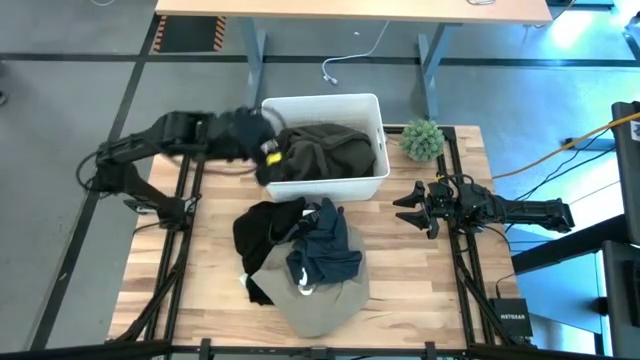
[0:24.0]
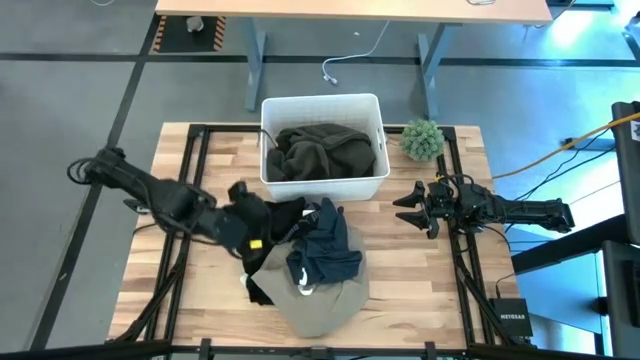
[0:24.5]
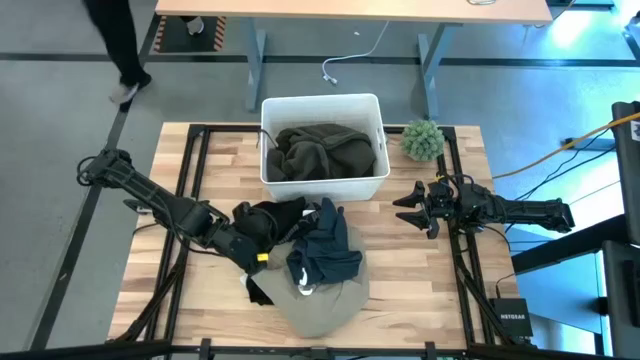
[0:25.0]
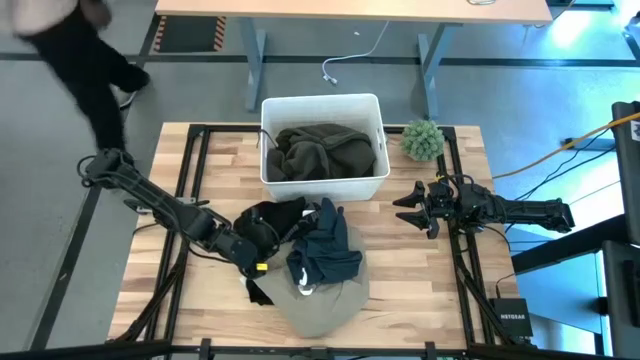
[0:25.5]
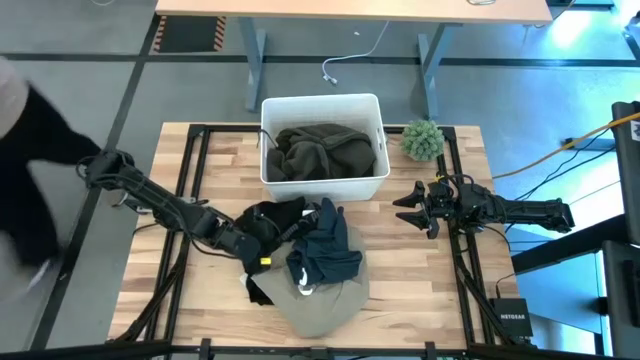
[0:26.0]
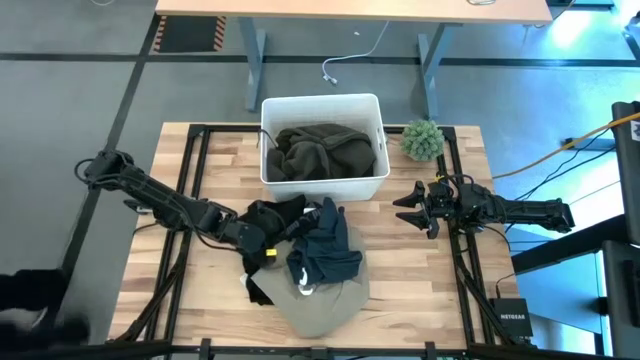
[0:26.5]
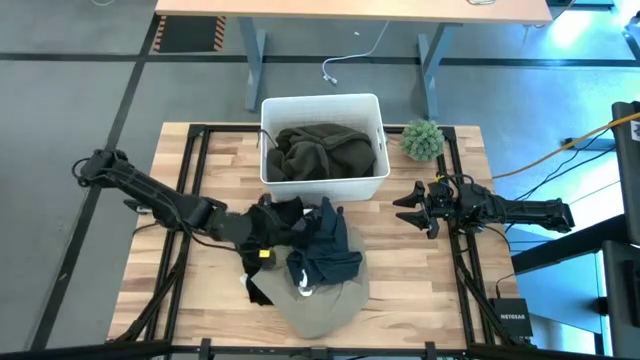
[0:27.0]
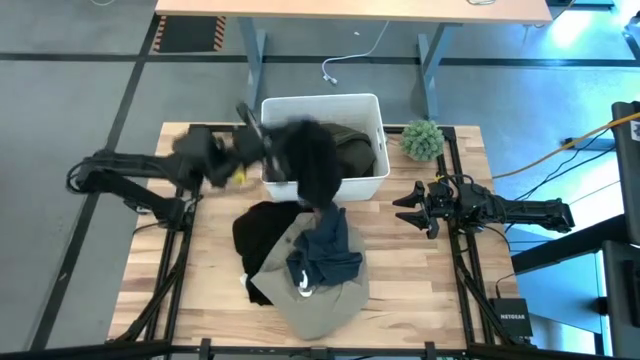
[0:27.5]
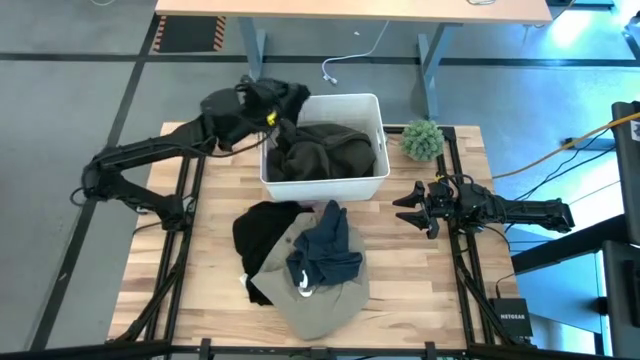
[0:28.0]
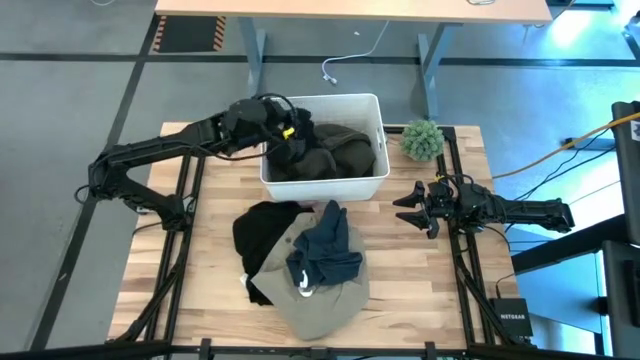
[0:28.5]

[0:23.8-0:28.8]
Task: Sort clothes
Put the black boxers into the white bin

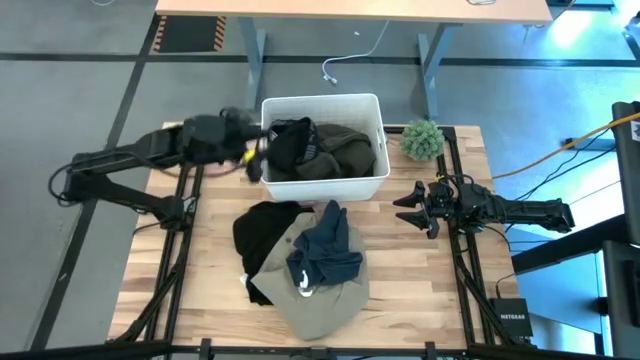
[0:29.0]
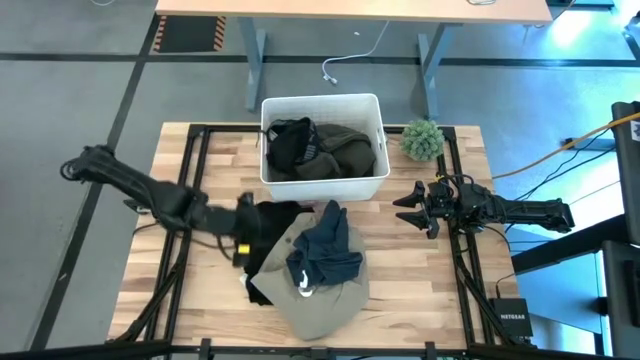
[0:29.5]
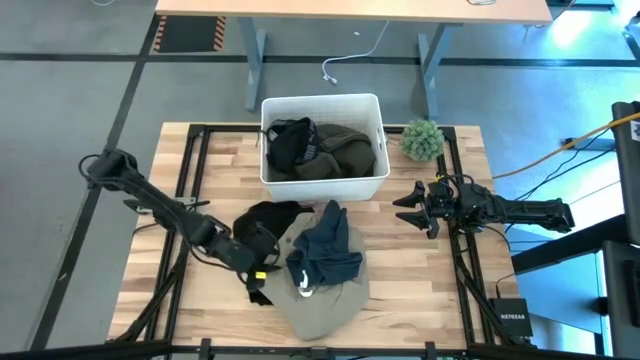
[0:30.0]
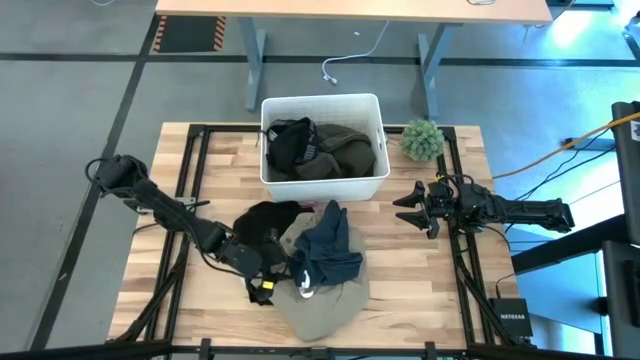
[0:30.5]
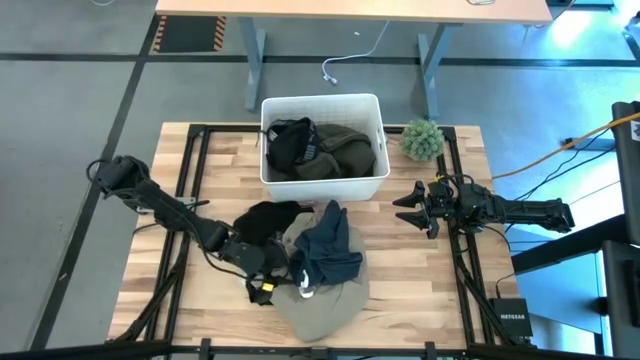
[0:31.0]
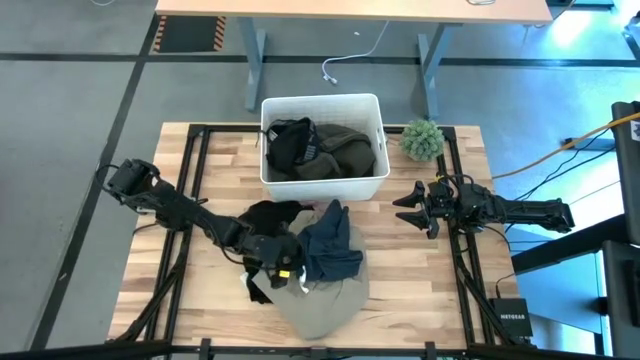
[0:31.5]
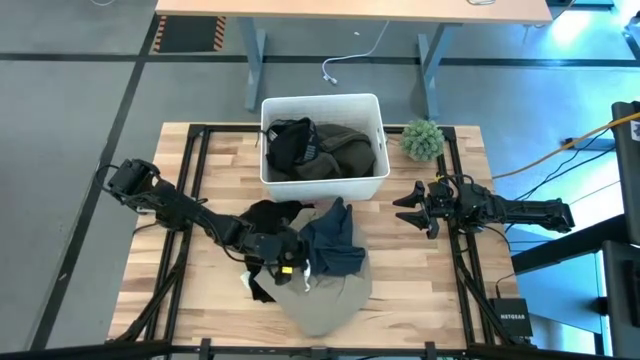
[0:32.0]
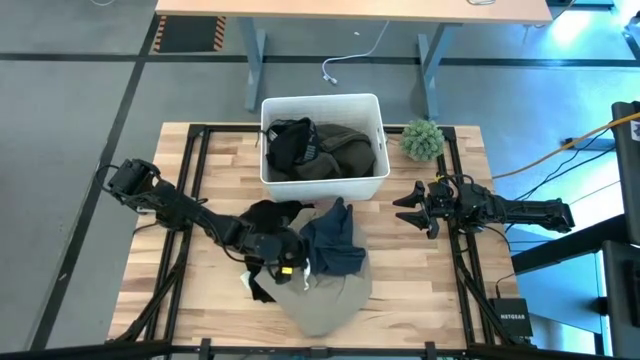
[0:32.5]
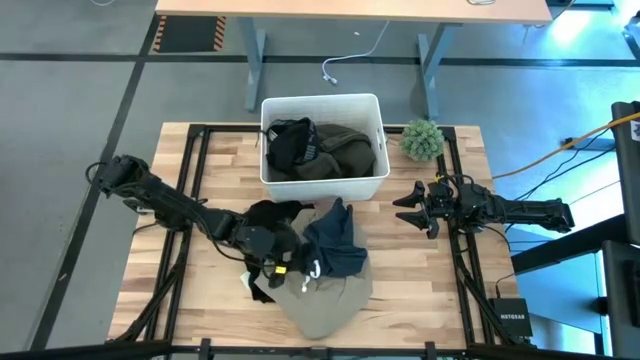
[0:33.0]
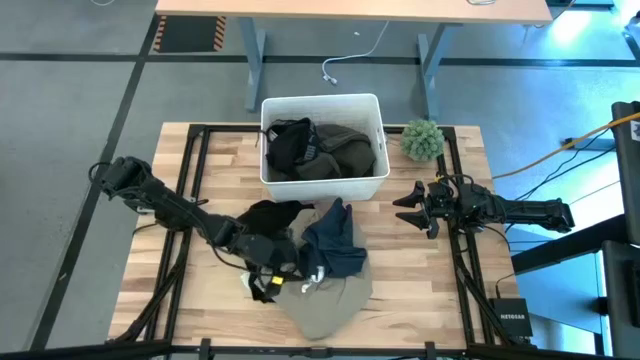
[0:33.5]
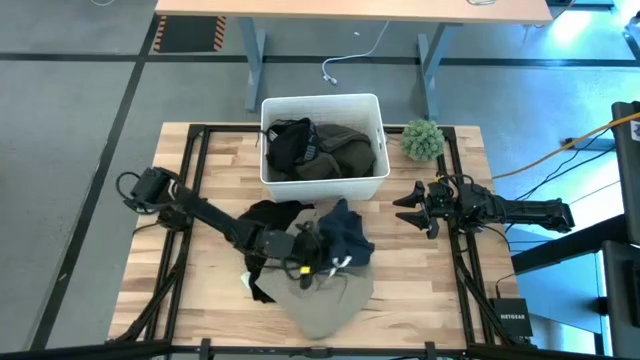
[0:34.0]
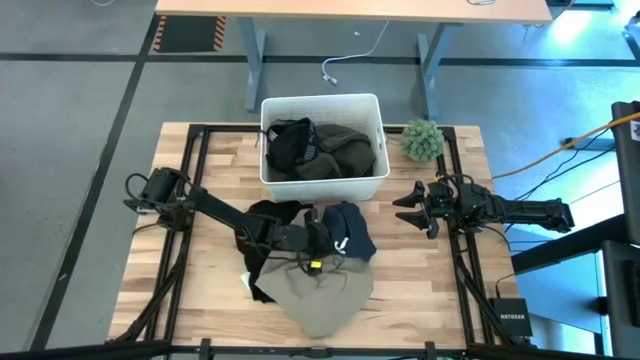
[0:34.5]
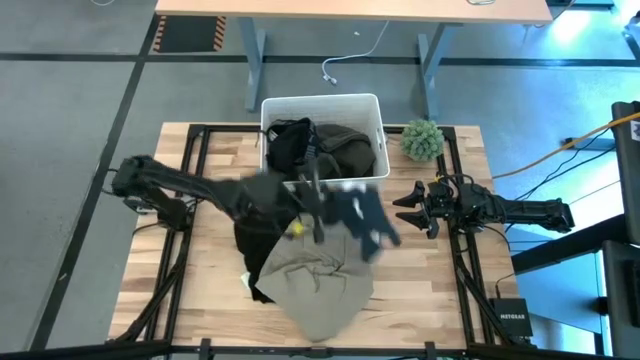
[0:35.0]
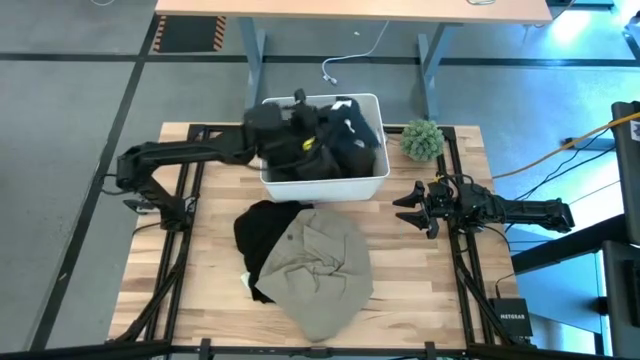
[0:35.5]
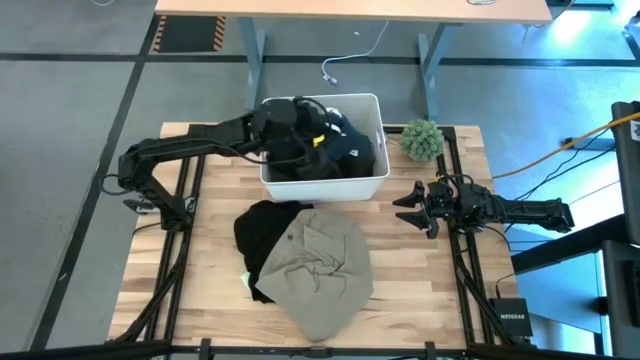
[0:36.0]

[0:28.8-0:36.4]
Put the blue shorts into the white bin

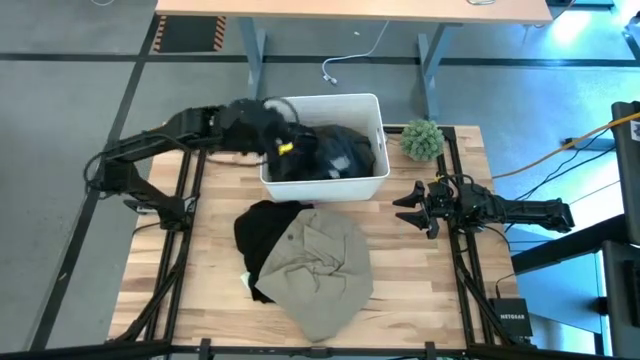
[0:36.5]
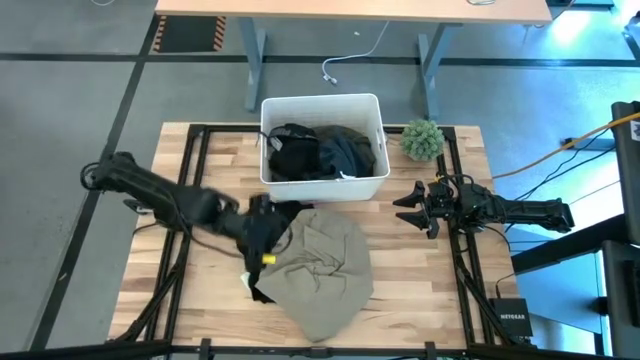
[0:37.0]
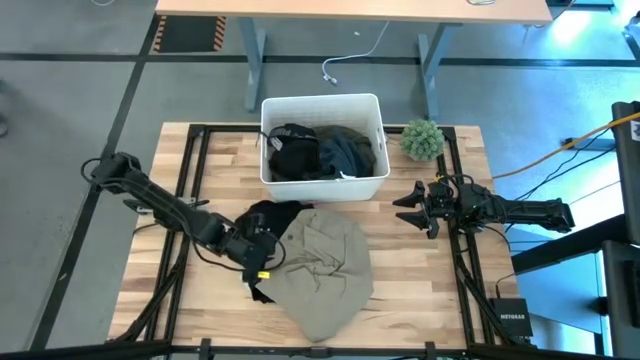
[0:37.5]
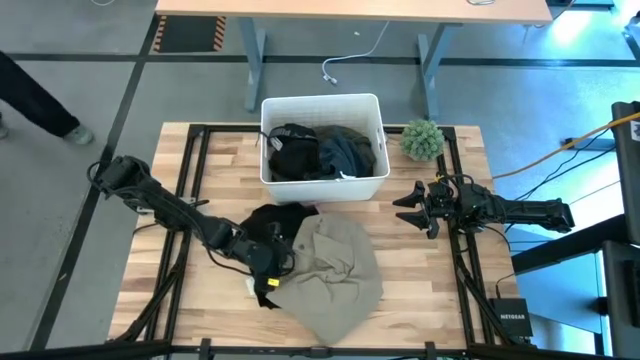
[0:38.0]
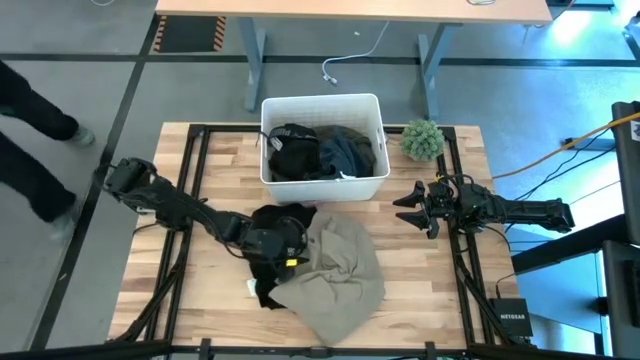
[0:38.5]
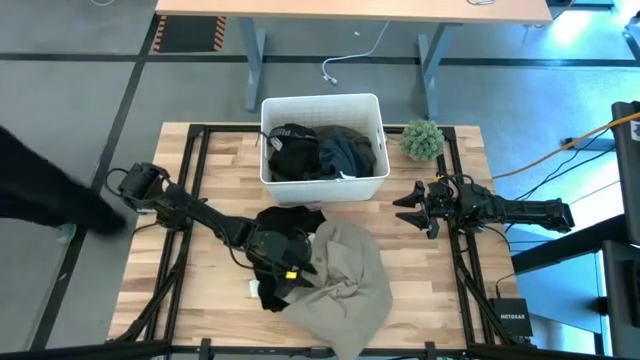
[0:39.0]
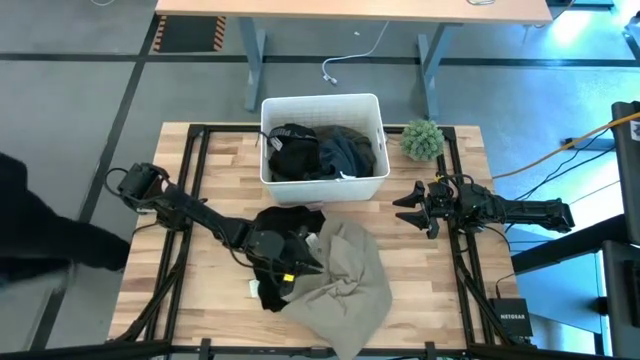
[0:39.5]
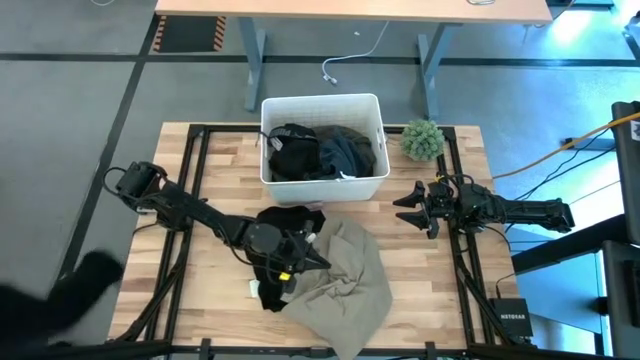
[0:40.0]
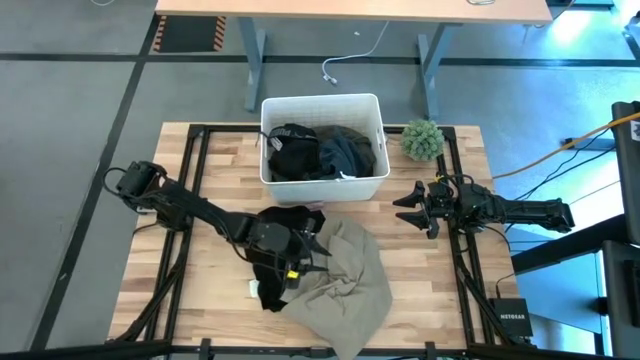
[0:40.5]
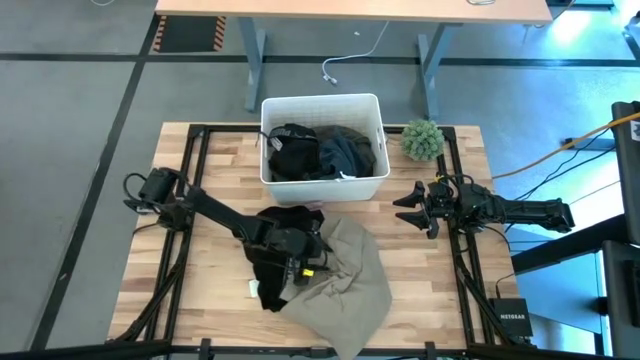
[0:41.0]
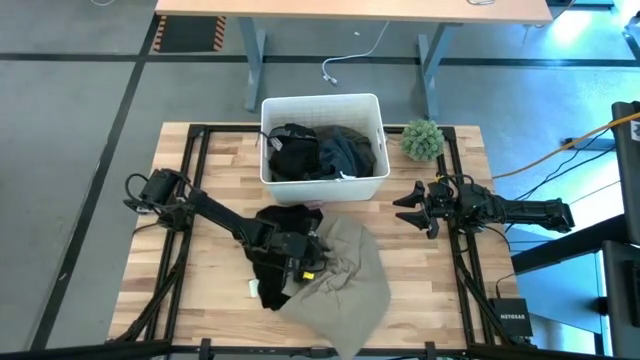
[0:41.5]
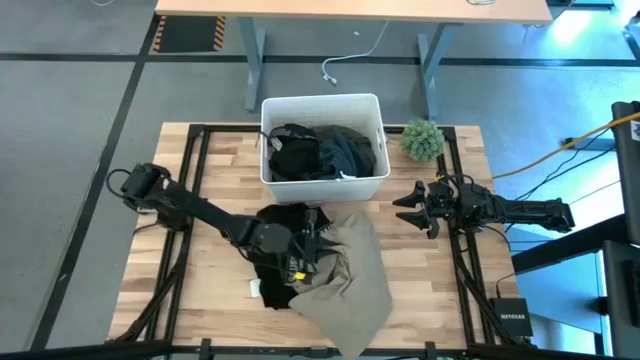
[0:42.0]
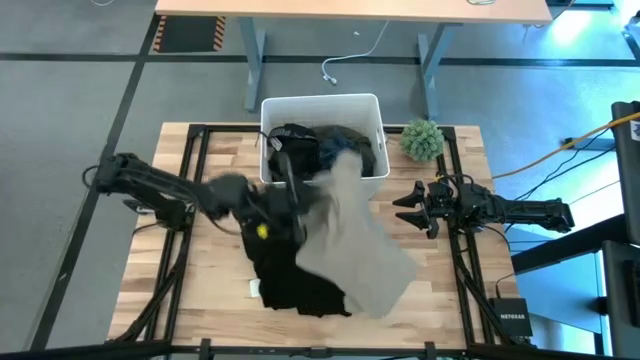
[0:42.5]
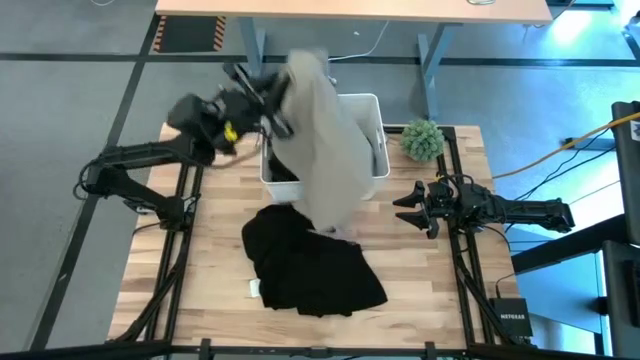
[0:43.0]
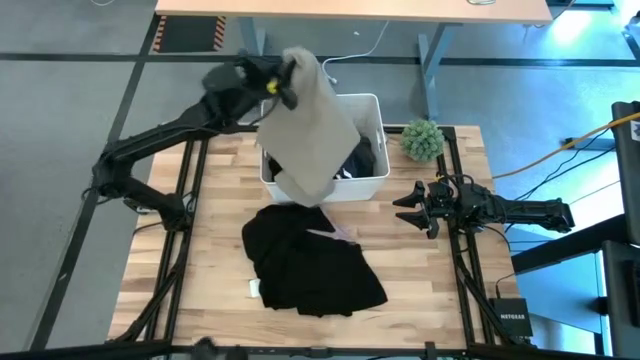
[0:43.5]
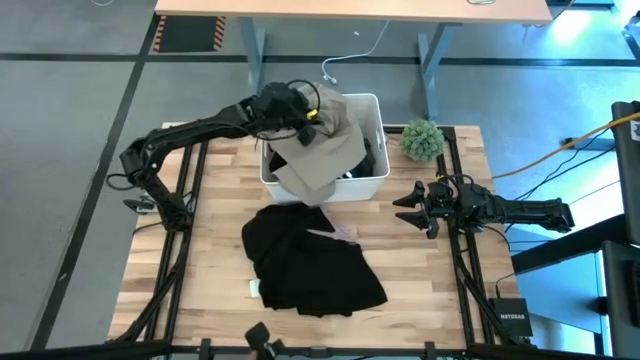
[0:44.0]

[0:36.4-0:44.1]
Put the gray shorts into the white bin
